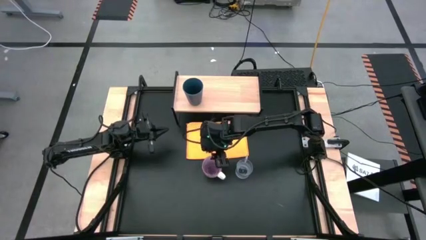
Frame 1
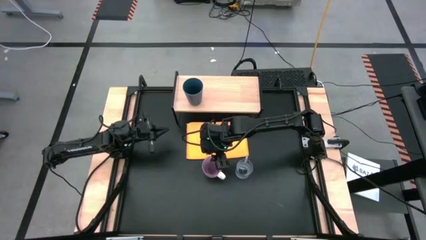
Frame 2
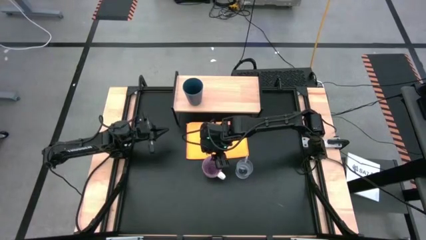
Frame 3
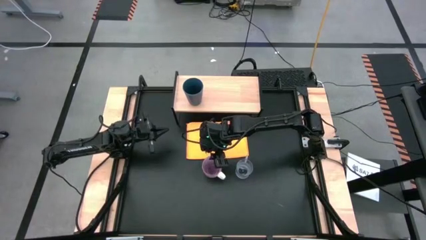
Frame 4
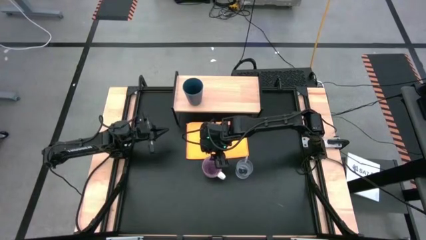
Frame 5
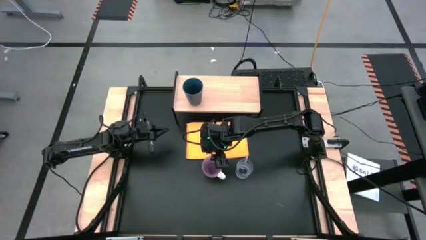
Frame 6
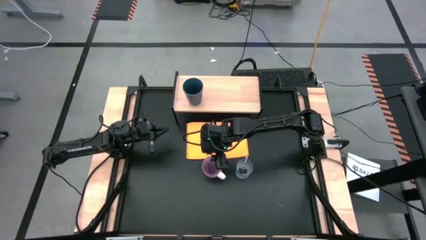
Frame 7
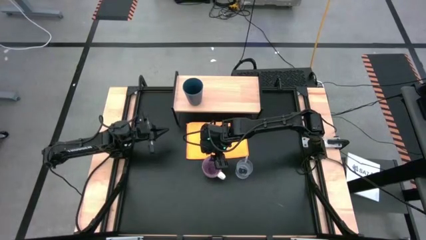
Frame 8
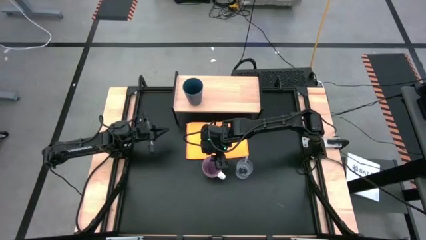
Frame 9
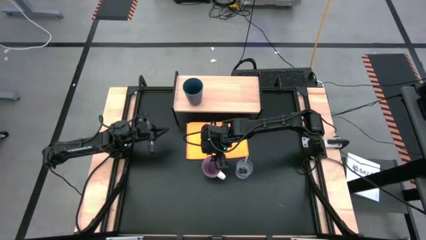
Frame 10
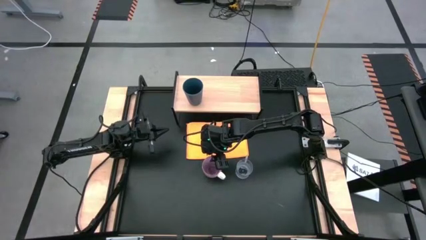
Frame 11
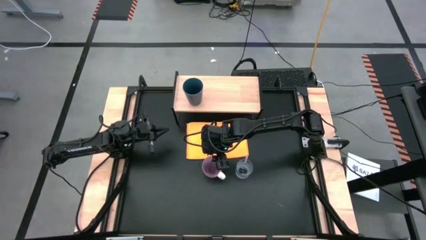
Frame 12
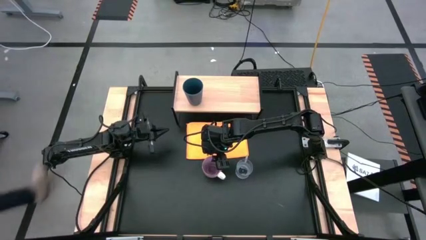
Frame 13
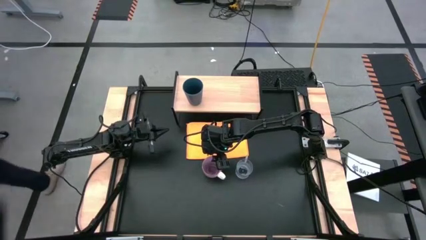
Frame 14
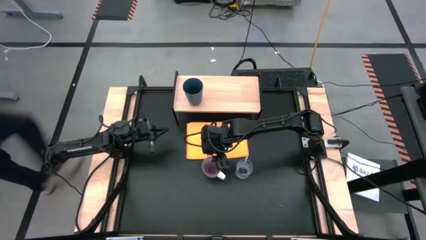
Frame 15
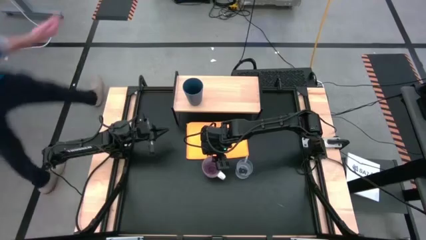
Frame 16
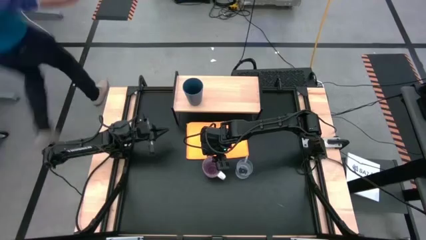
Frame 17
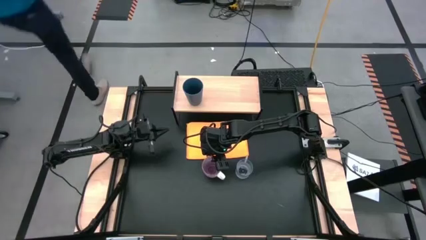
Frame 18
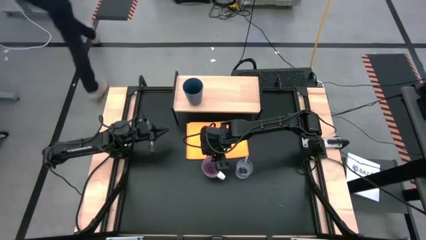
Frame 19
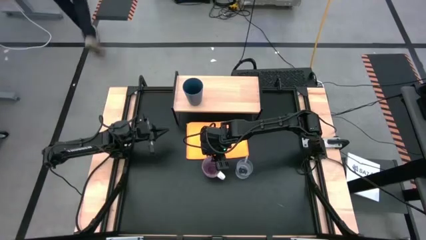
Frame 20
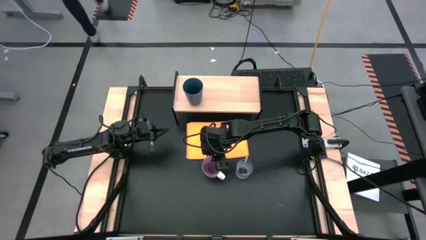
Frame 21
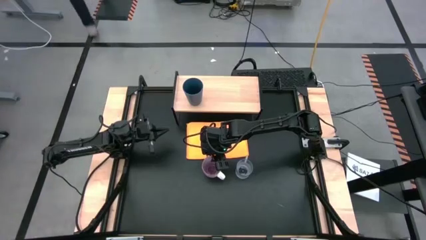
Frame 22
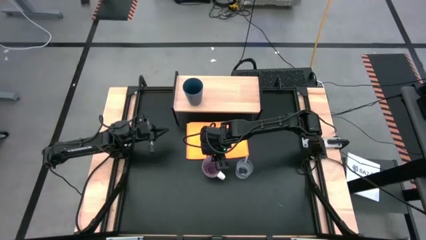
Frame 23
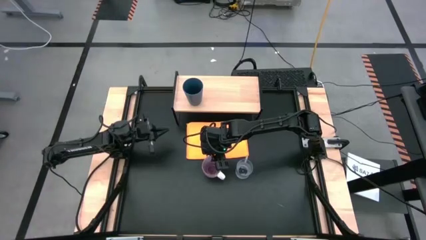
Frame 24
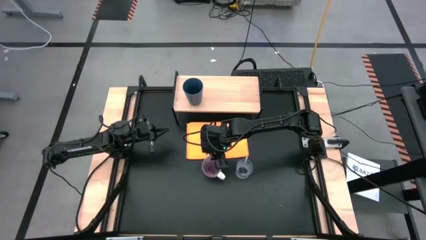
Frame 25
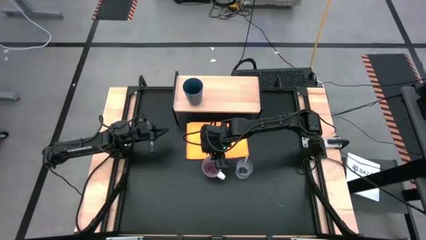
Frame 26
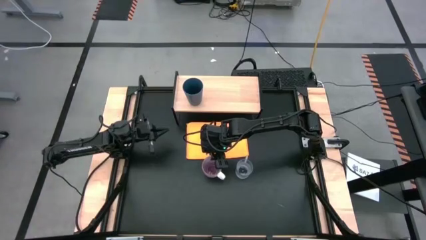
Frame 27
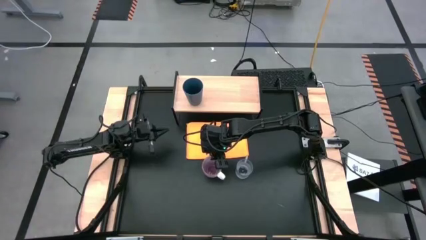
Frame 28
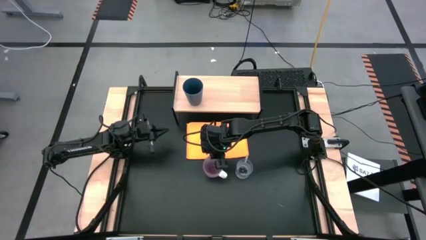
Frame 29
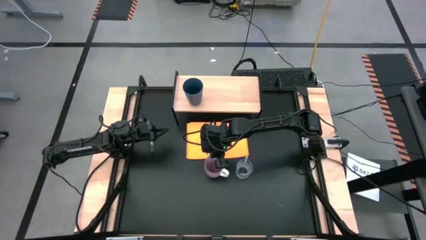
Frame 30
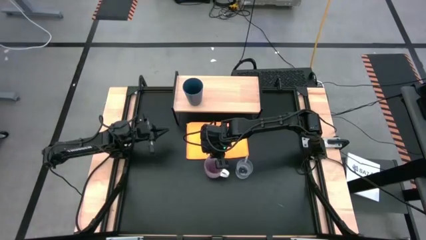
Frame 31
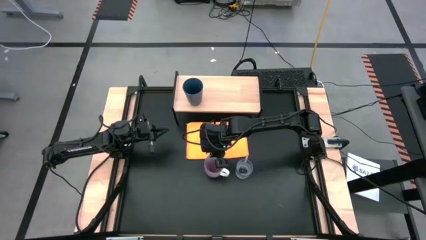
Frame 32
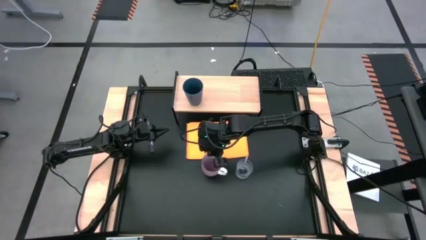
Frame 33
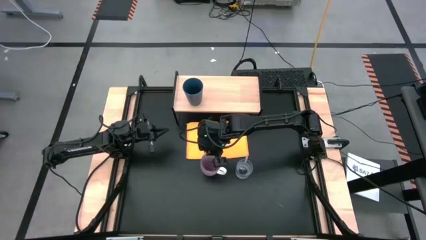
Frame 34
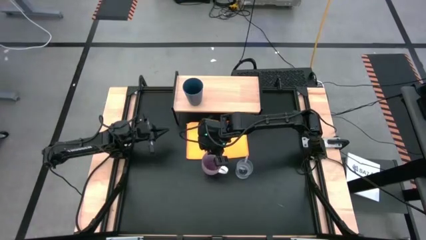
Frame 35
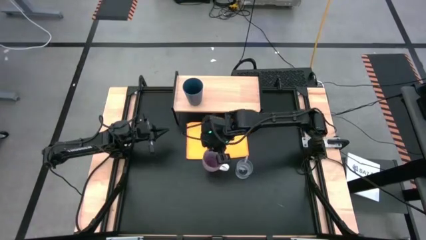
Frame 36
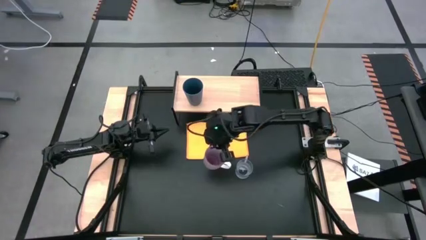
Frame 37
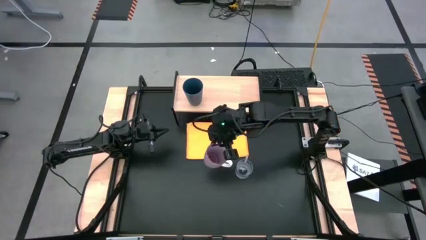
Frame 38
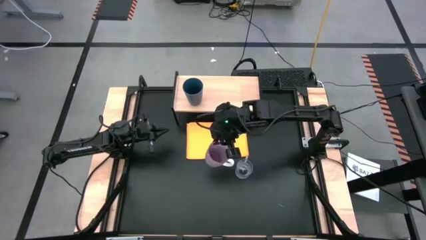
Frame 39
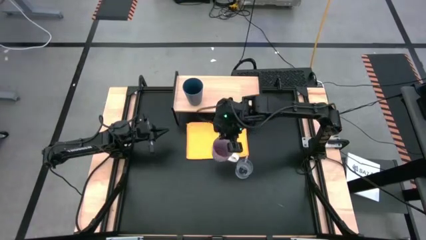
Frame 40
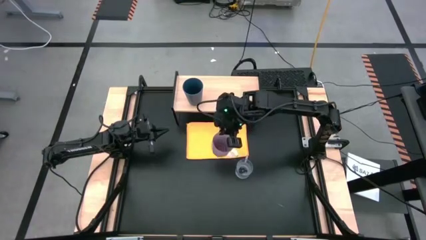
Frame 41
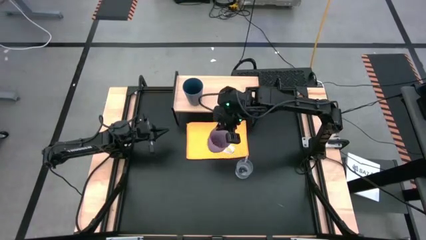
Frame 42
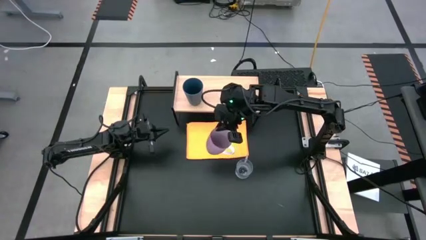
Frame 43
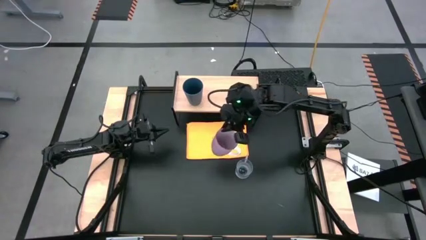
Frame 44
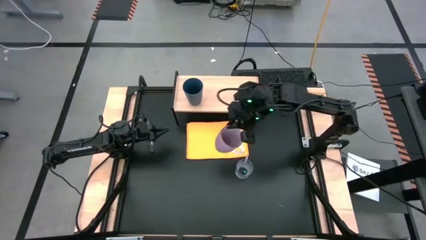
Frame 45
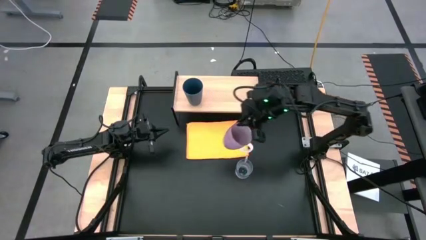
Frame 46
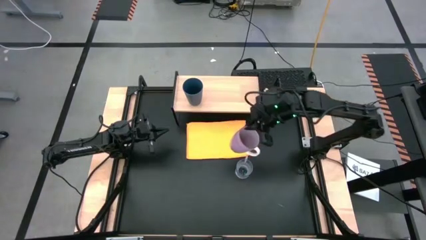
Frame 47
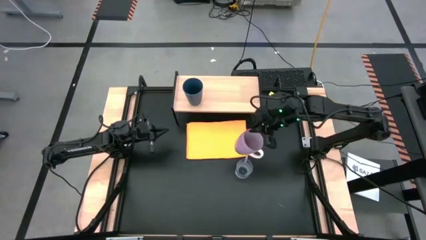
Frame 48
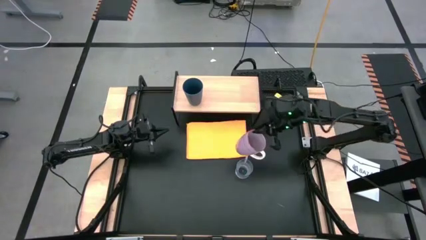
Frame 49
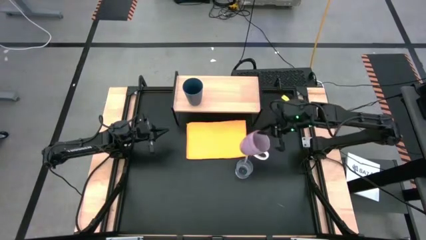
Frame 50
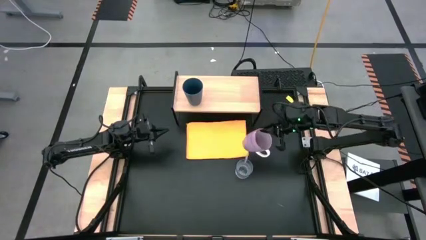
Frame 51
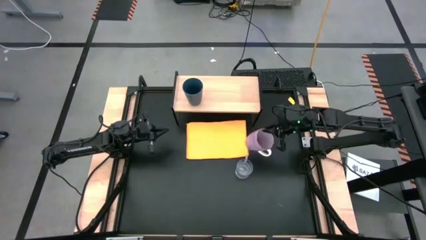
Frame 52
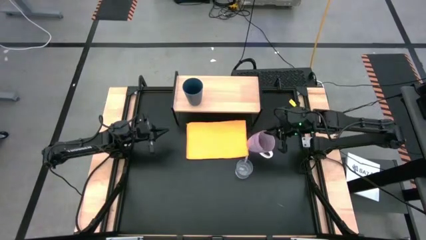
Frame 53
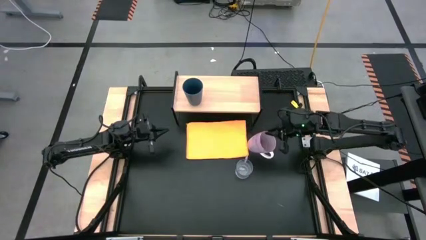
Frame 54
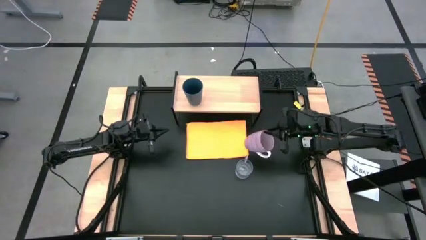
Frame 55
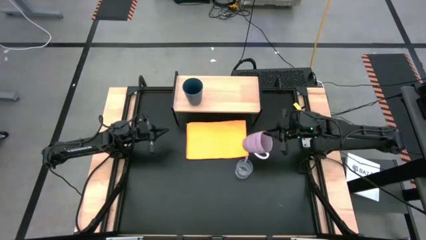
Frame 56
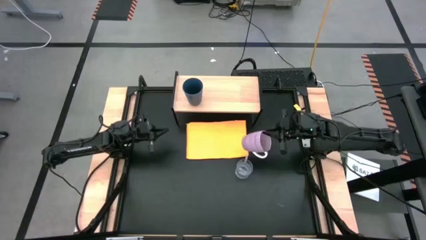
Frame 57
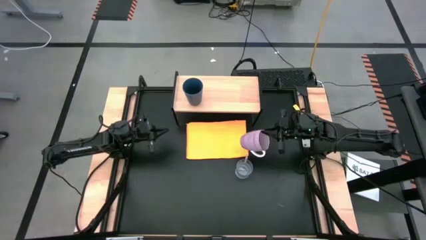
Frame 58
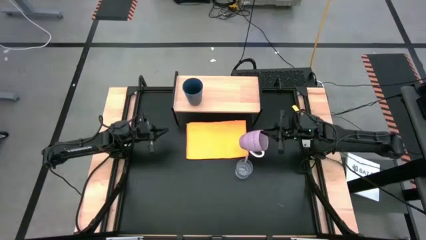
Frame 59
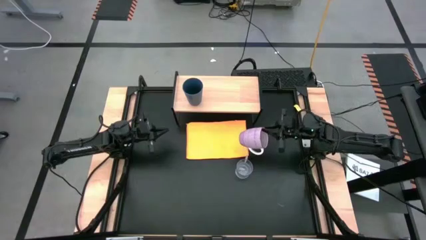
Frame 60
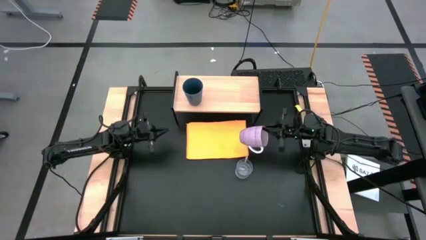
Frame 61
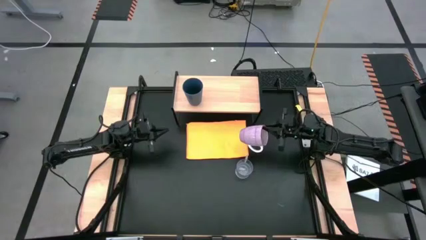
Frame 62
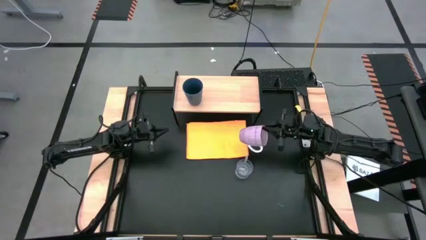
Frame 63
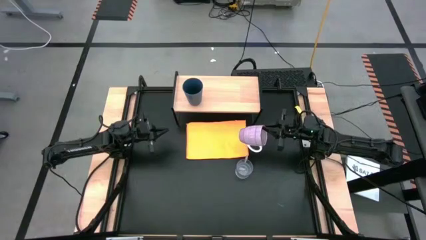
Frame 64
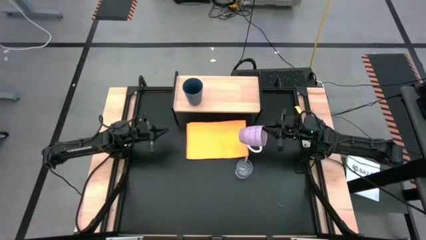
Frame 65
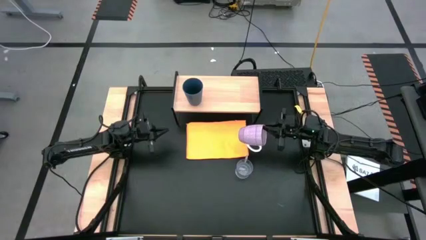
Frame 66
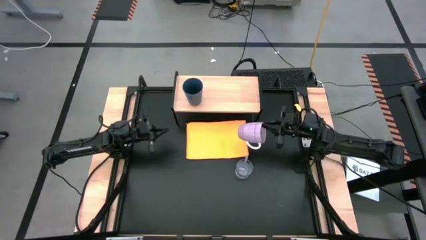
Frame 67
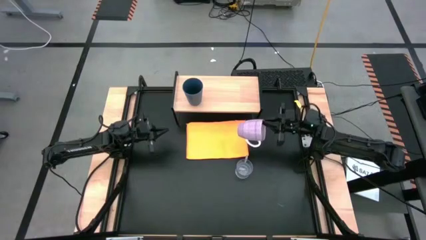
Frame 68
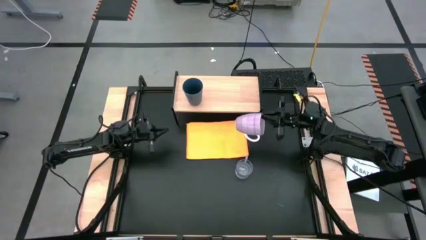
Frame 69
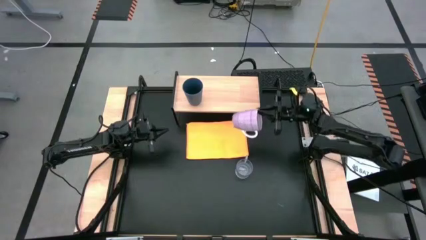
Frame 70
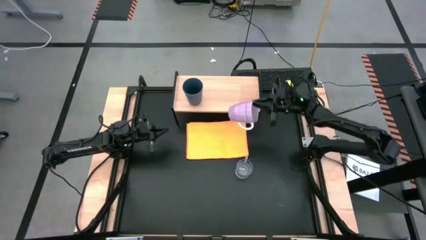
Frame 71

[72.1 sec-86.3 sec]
Task: Stack small to large cups/mugs on shelf
Put the purple mug on the shelf

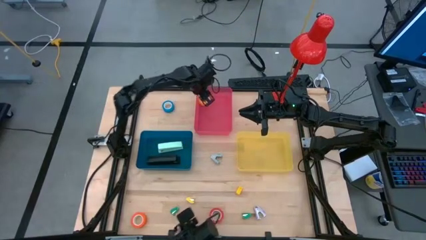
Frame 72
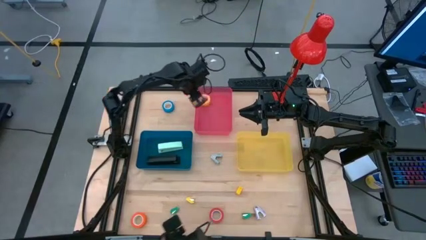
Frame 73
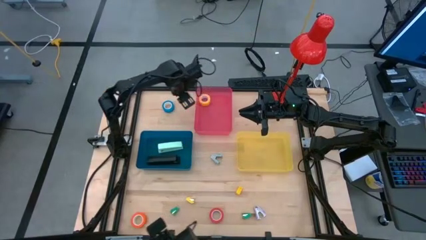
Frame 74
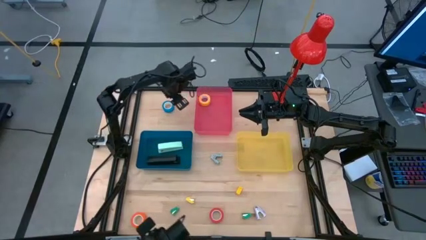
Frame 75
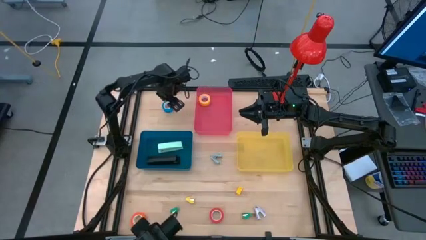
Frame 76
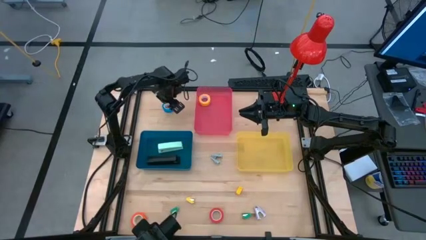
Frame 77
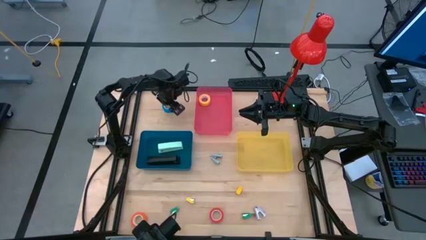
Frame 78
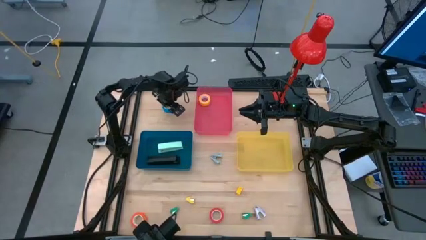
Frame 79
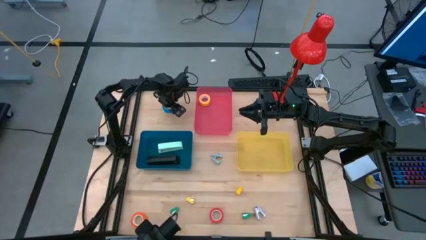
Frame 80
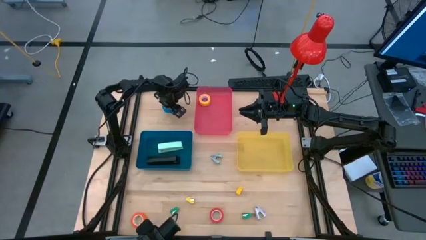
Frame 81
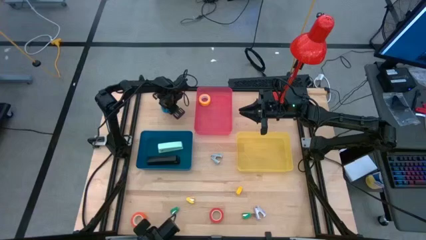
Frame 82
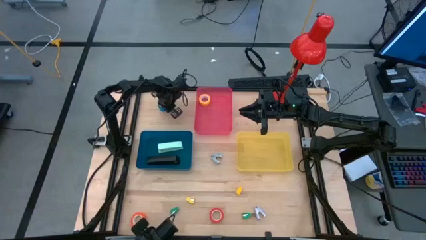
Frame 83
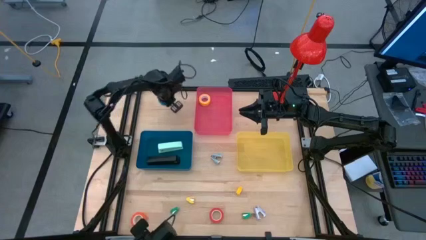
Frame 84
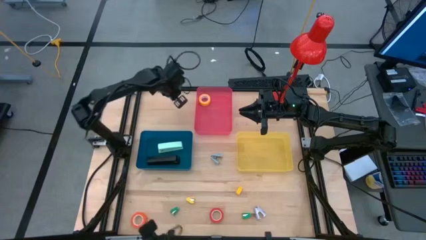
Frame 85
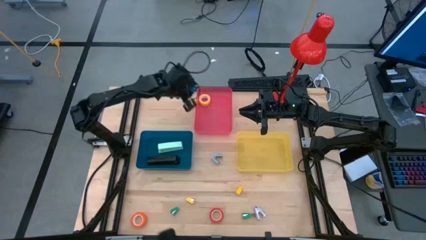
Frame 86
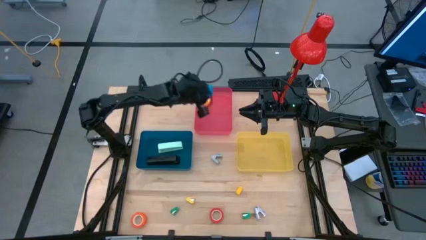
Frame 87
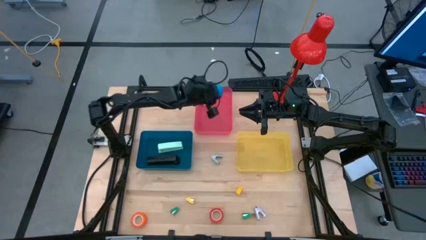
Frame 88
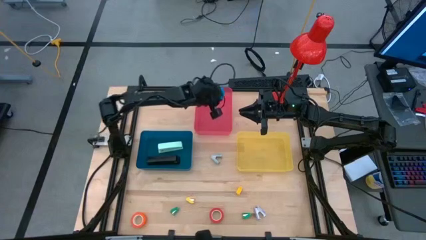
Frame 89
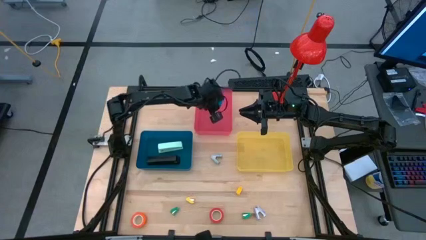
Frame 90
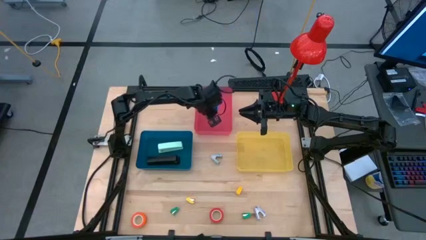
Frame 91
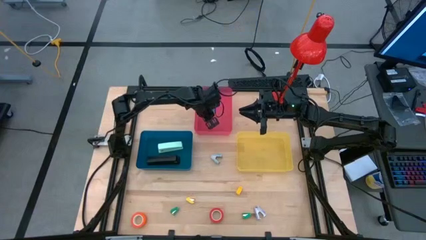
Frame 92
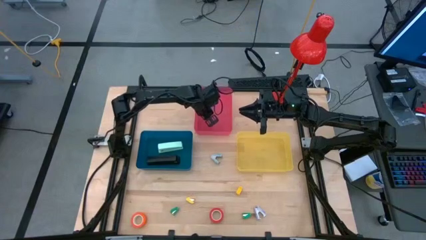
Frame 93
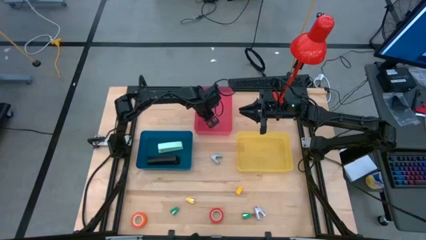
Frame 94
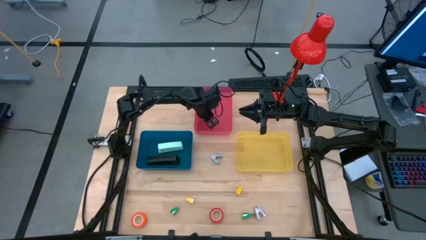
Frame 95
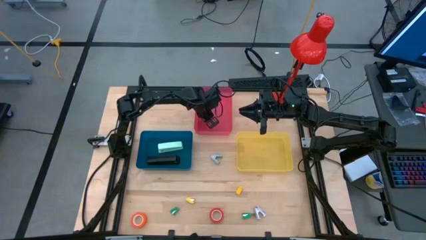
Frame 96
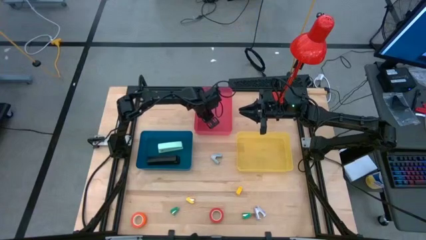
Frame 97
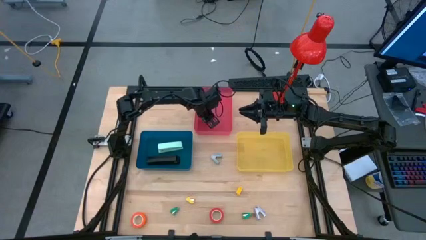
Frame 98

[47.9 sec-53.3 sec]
Task: Pick and place Stapler, Stapler remover, tape
Put the blue tape into the pink bin
